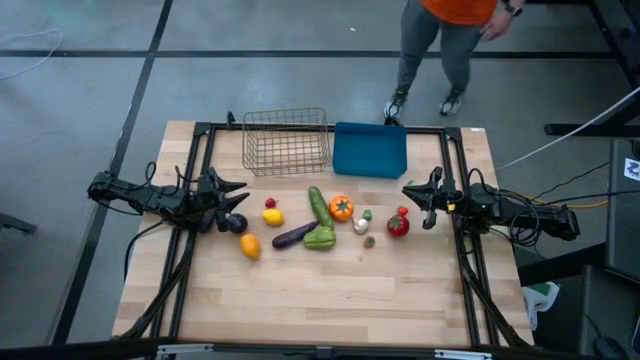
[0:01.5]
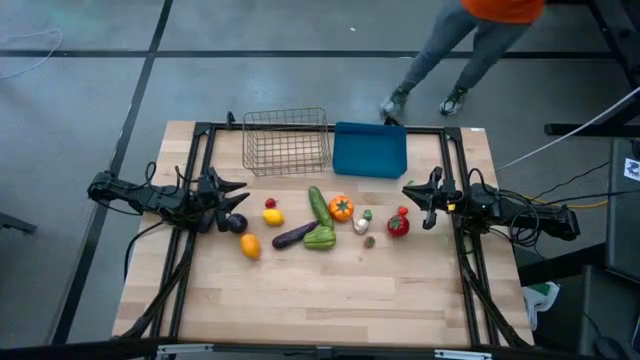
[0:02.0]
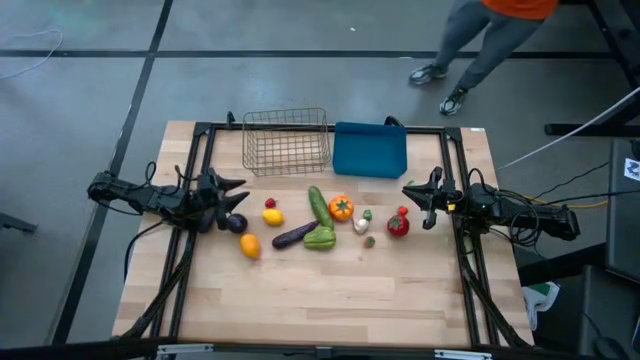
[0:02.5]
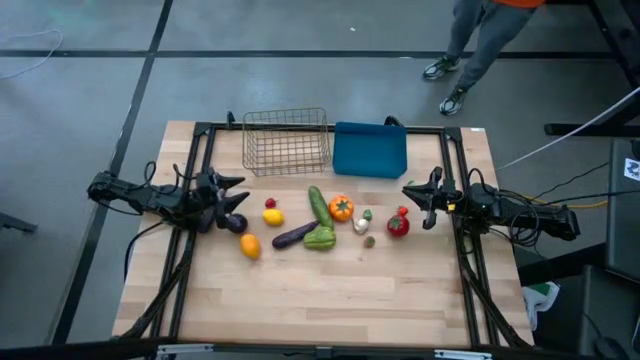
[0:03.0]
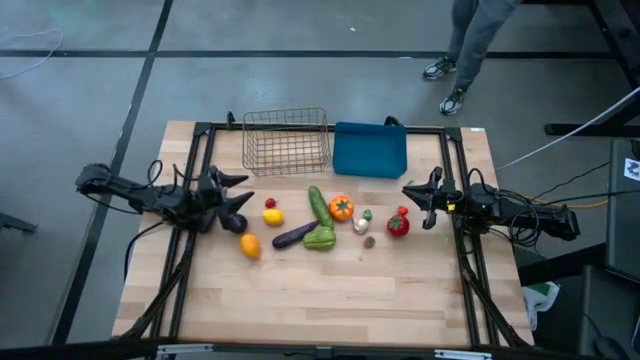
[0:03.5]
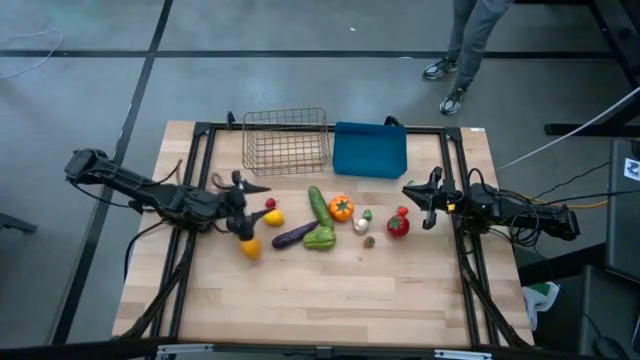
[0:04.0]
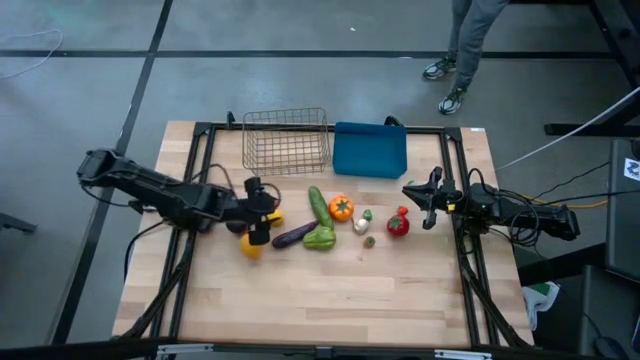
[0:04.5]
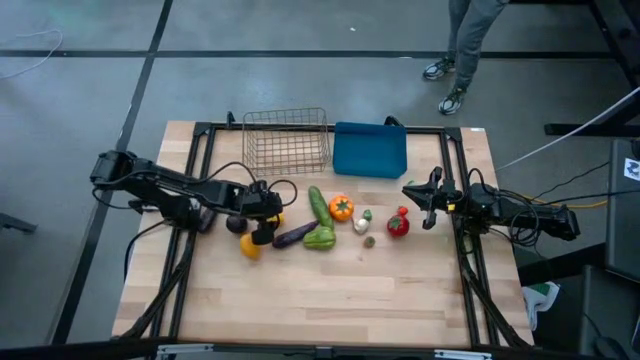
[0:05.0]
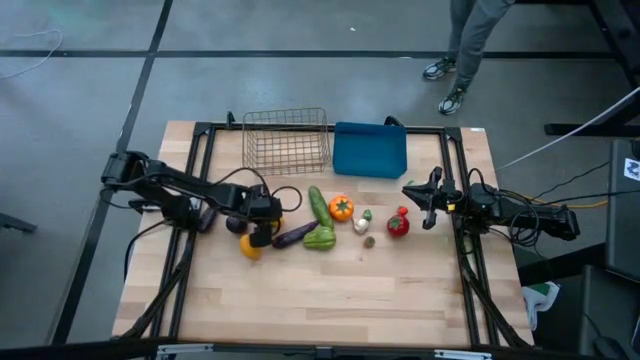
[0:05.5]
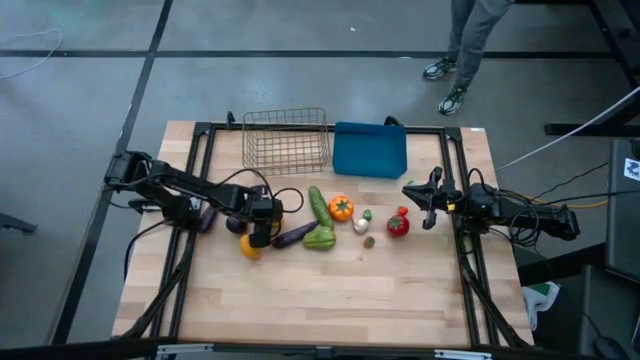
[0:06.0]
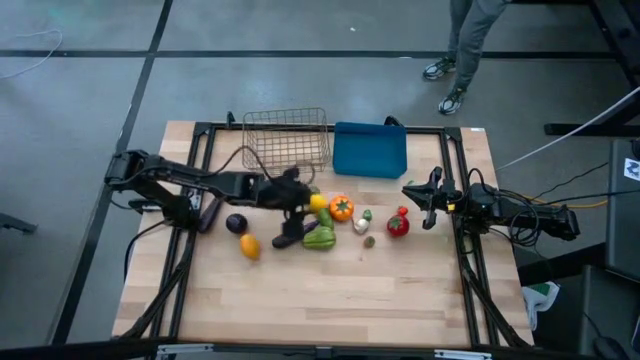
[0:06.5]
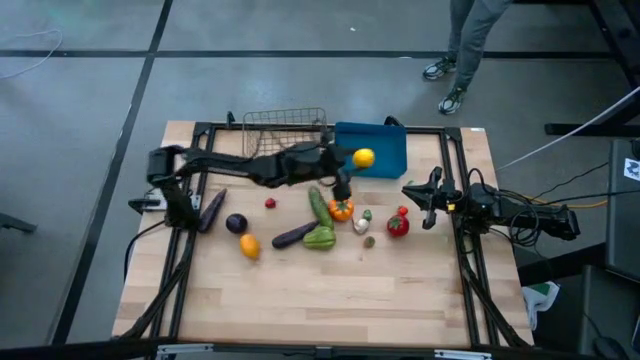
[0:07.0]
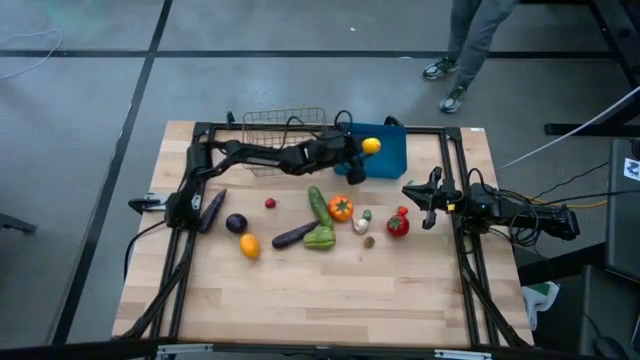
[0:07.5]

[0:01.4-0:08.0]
Task: Sort produce into baskets
Put the top lemon into the blue bin

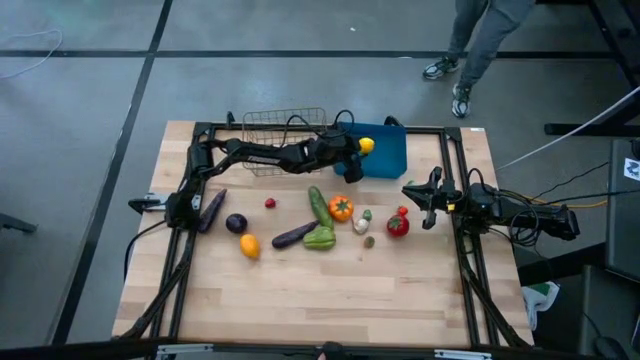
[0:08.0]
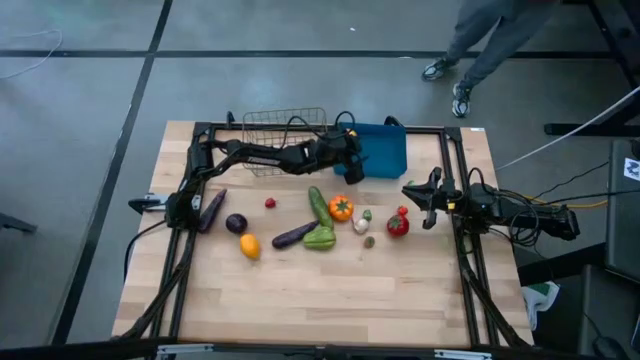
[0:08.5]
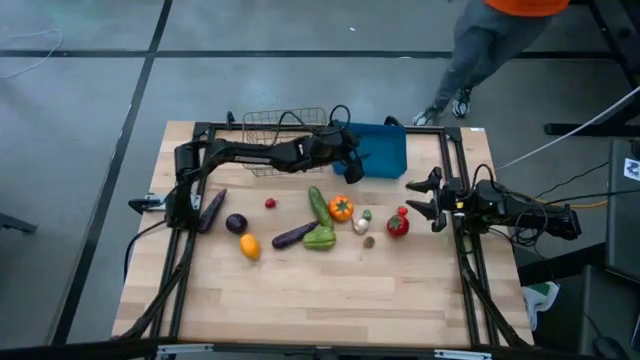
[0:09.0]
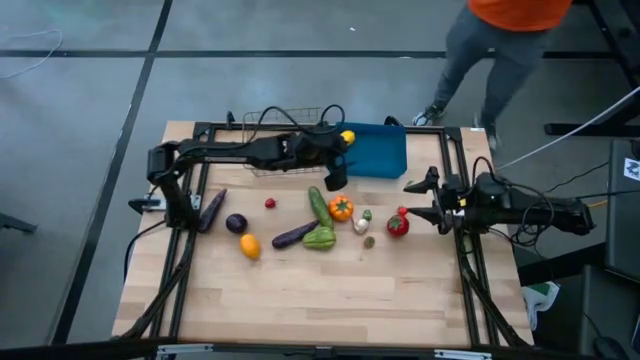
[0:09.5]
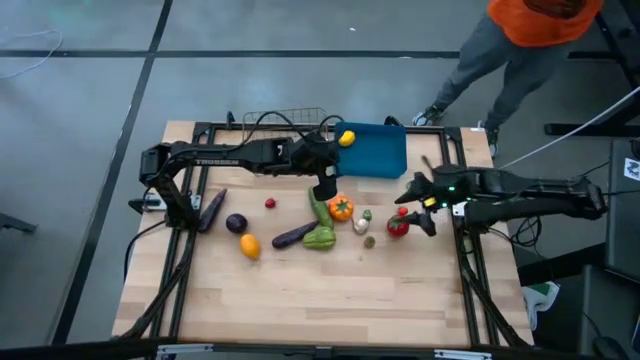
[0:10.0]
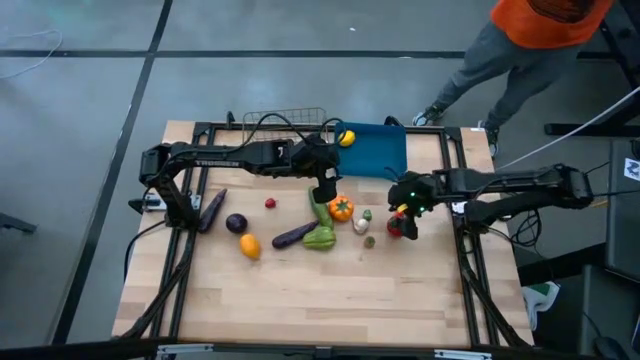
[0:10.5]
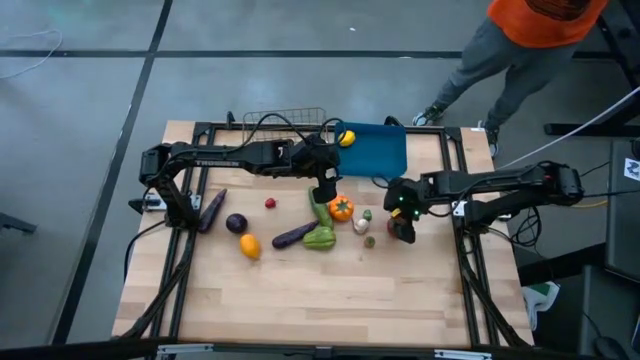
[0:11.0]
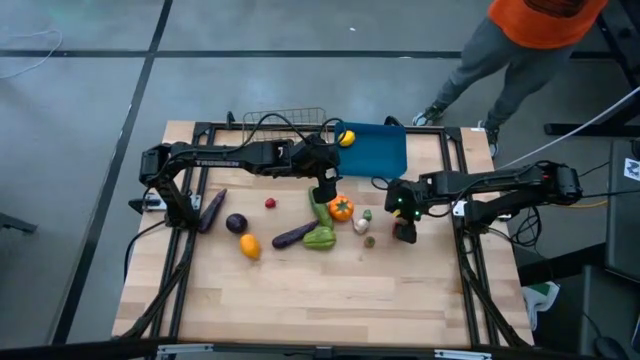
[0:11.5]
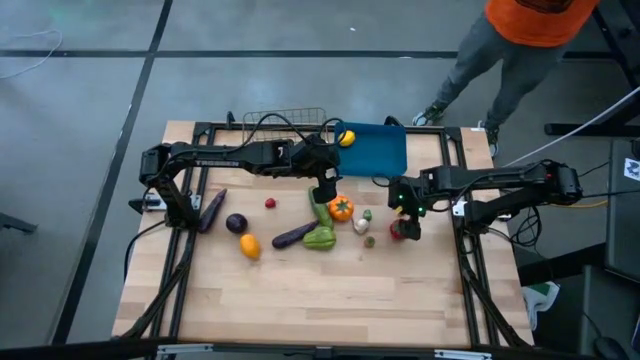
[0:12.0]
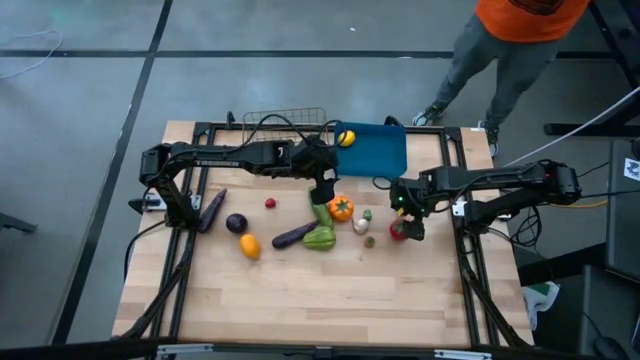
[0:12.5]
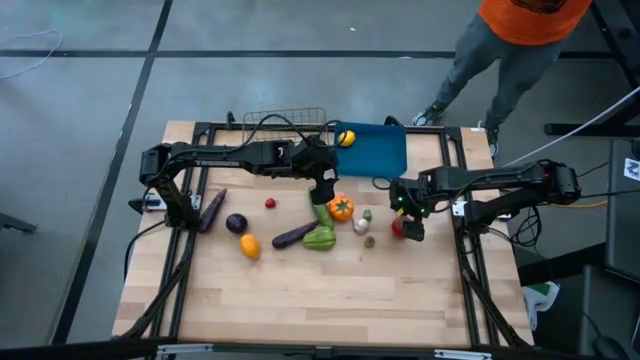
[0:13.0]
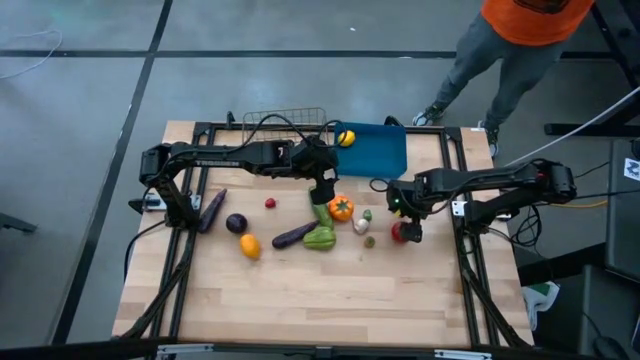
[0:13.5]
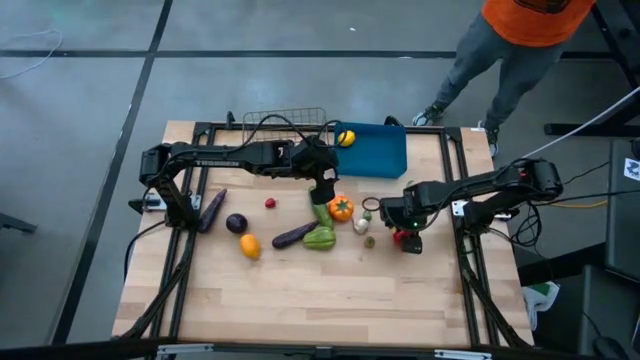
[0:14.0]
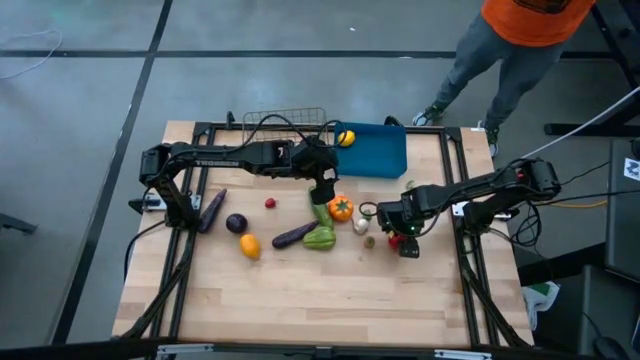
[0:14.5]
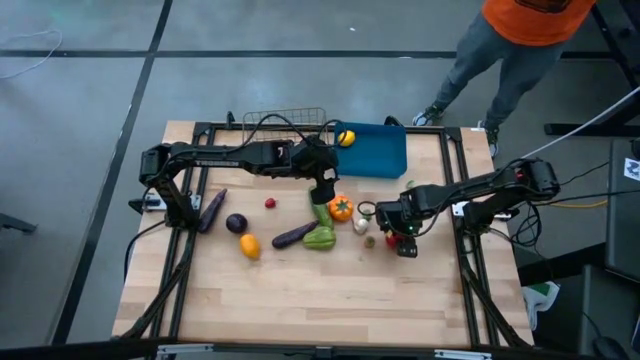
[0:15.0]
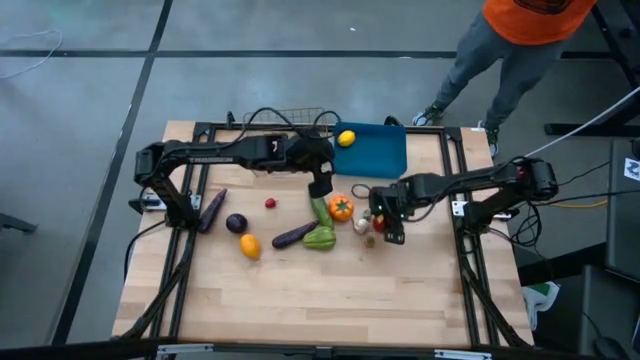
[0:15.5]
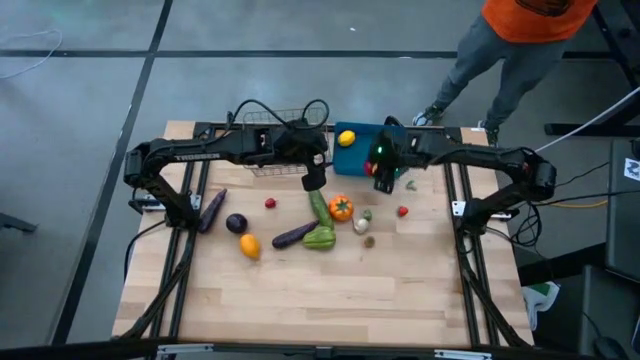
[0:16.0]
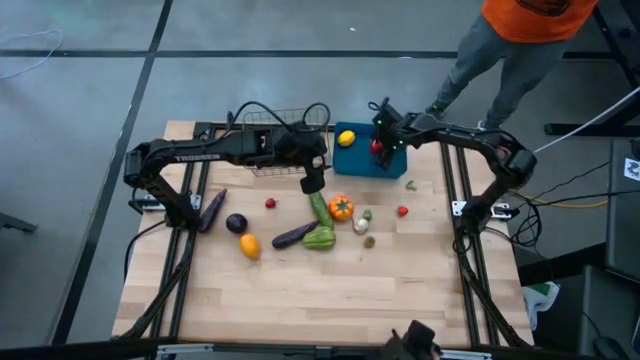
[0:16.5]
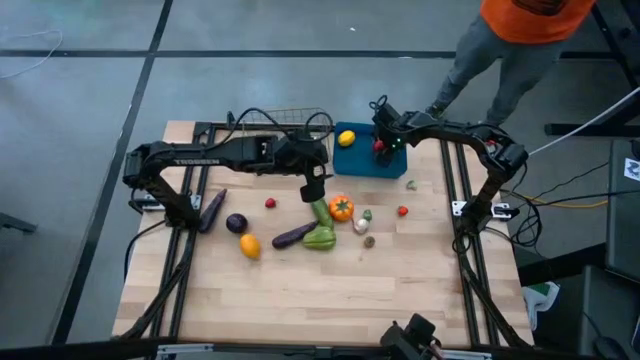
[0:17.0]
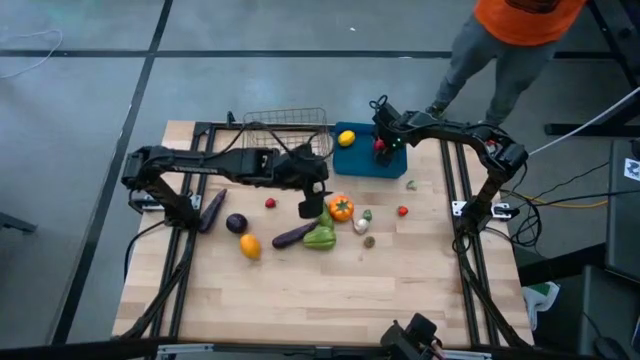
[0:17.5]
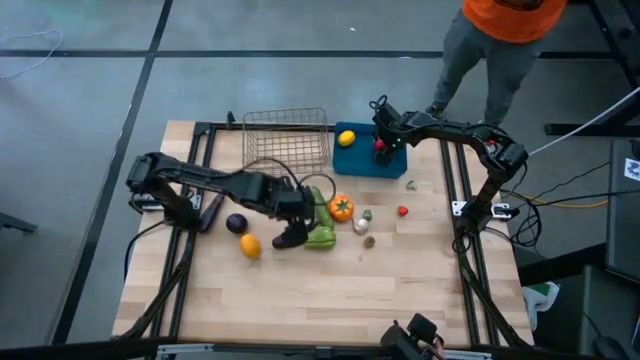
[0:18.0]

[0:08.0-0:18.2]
Put the large red tomato into the blue bin

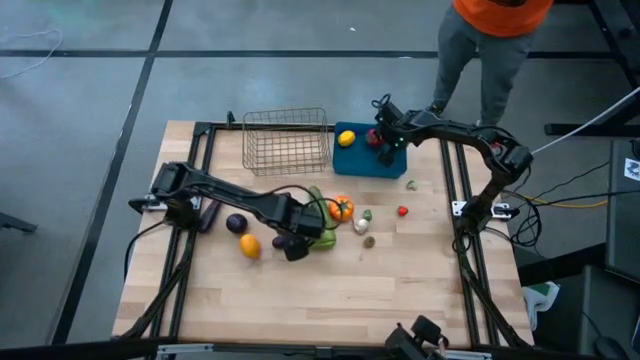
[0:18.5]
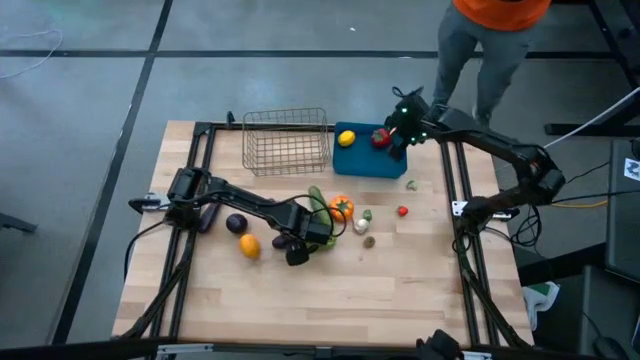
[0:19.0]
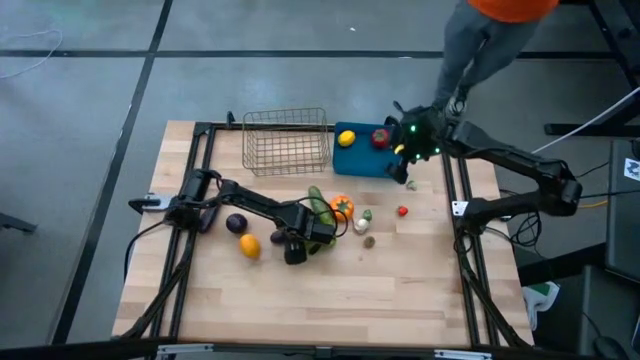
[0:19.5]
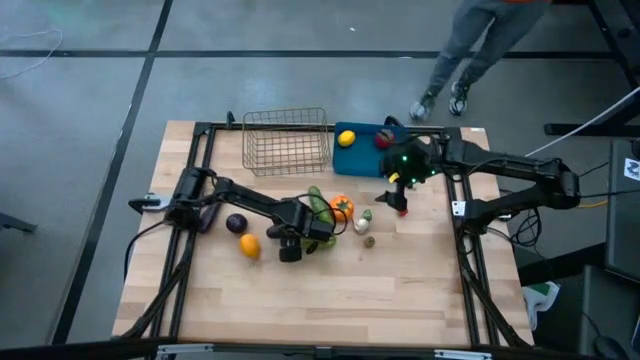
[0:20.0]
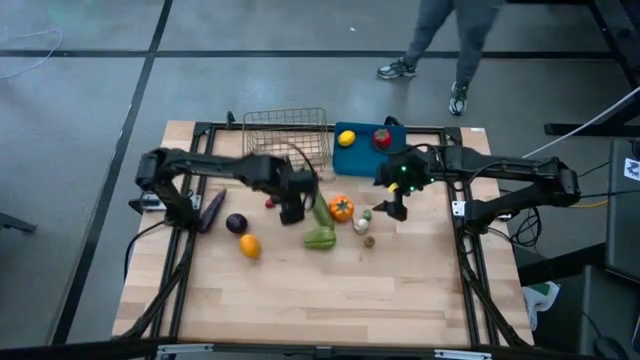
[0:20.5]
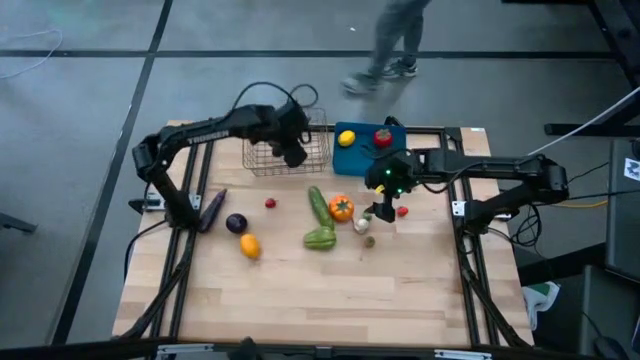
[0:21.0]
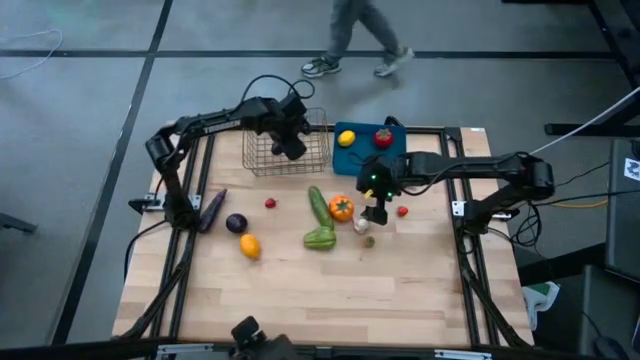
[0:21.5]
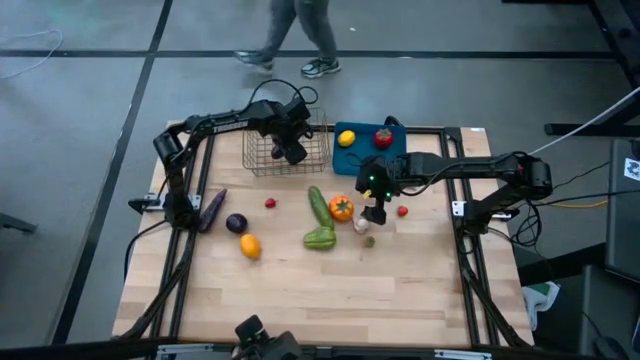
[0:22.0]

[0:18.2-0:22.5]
Put the left eggplant into the wire basket
